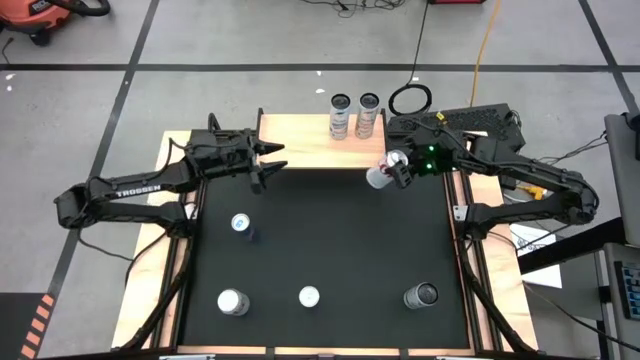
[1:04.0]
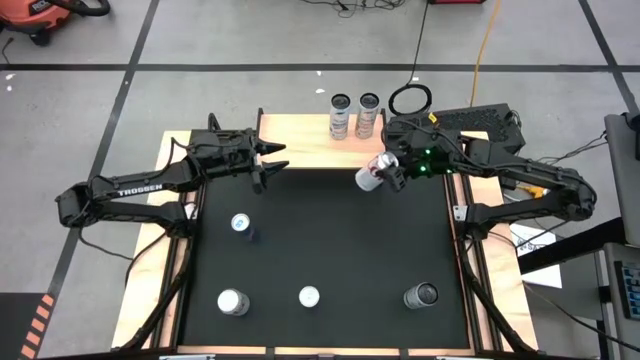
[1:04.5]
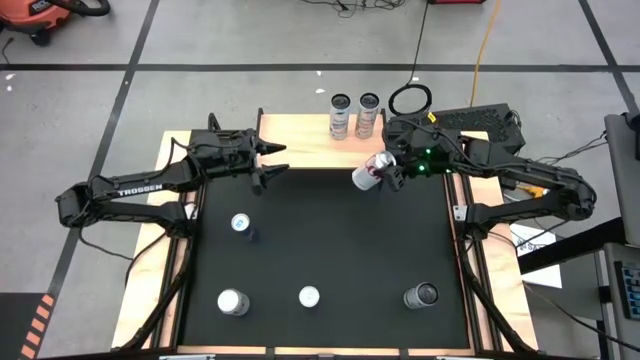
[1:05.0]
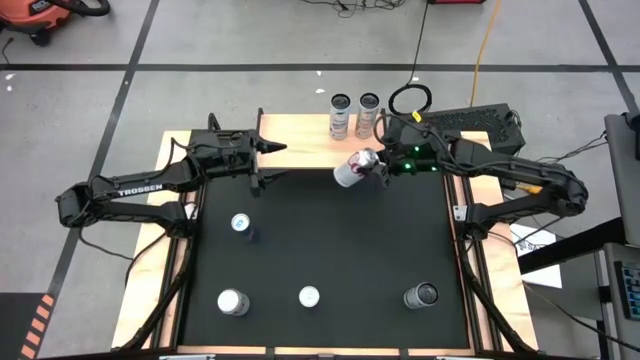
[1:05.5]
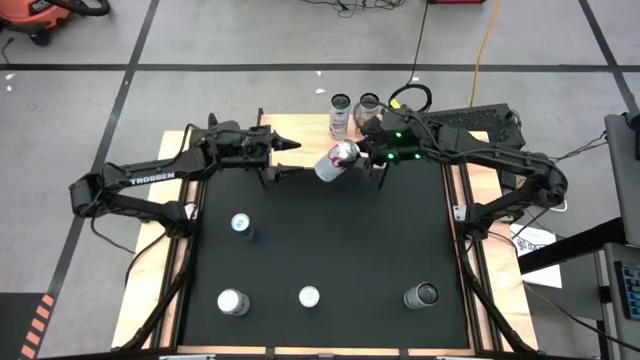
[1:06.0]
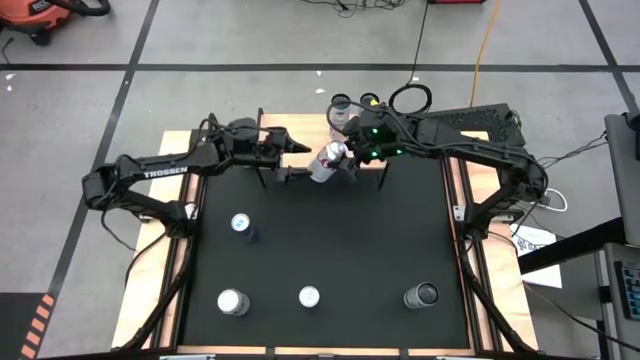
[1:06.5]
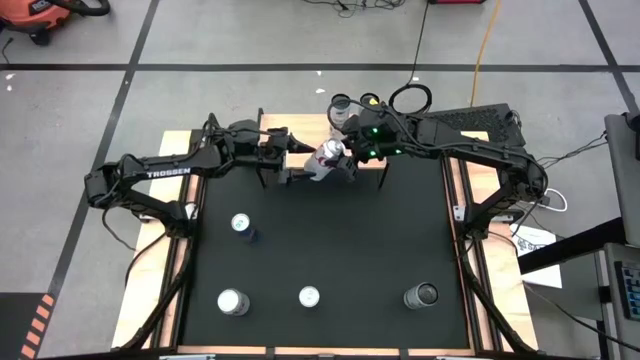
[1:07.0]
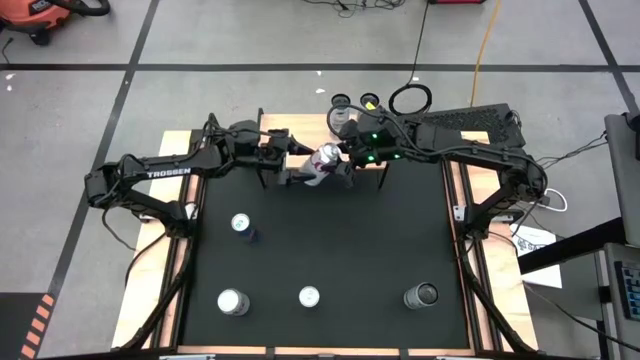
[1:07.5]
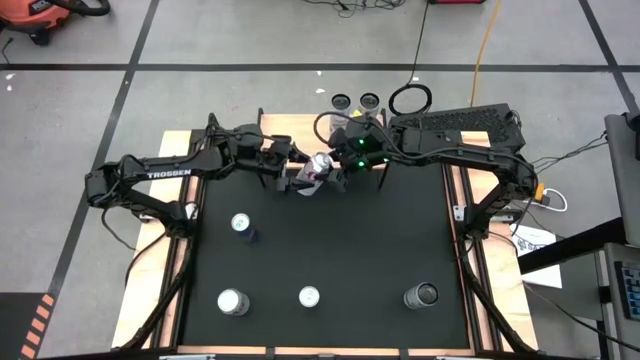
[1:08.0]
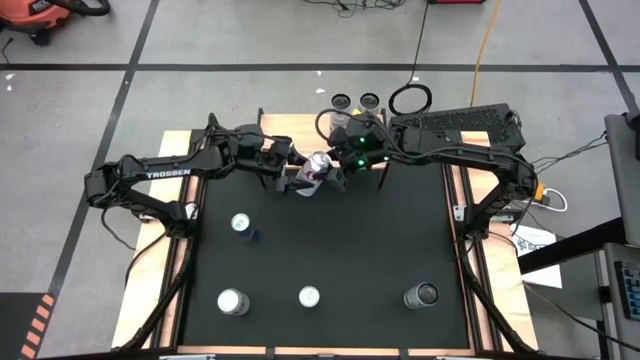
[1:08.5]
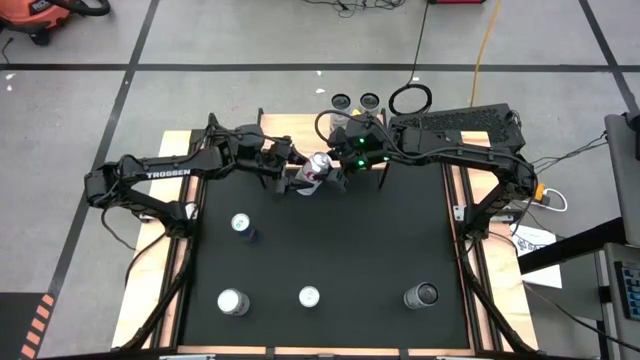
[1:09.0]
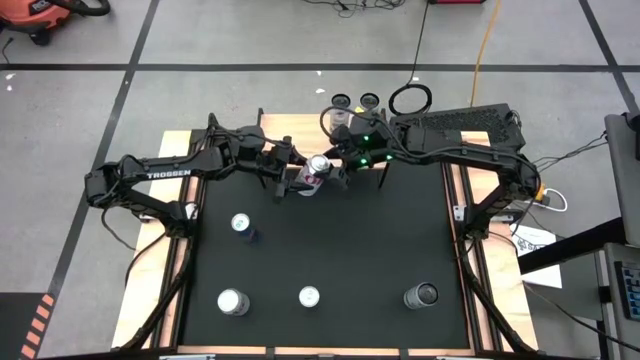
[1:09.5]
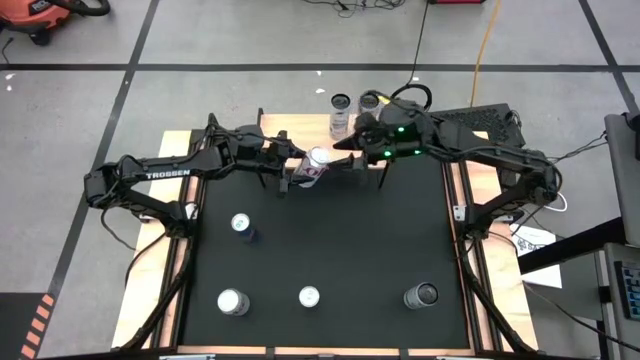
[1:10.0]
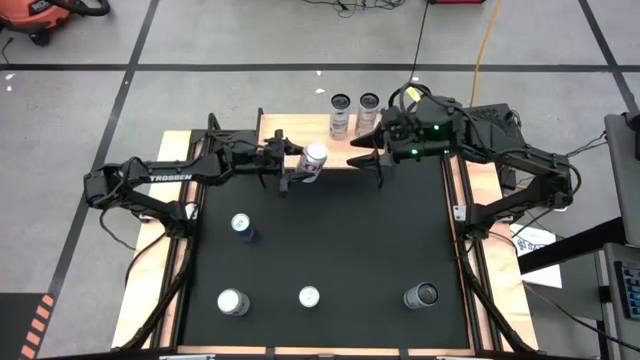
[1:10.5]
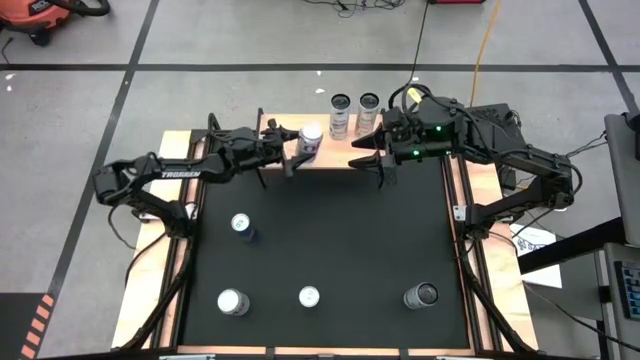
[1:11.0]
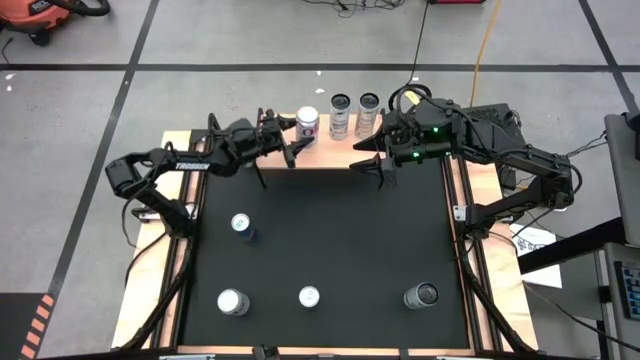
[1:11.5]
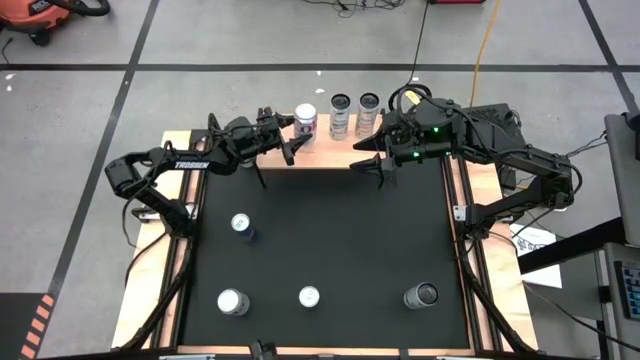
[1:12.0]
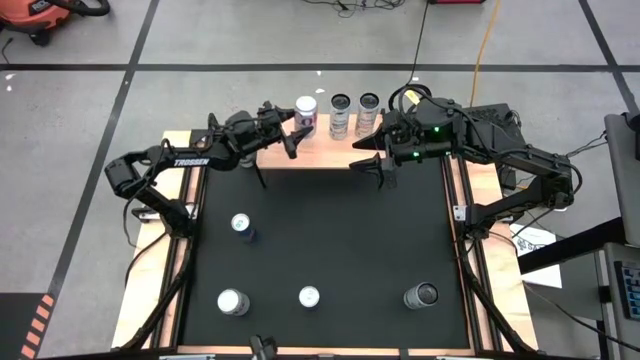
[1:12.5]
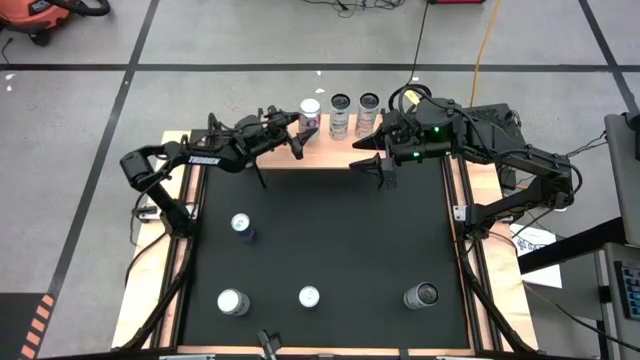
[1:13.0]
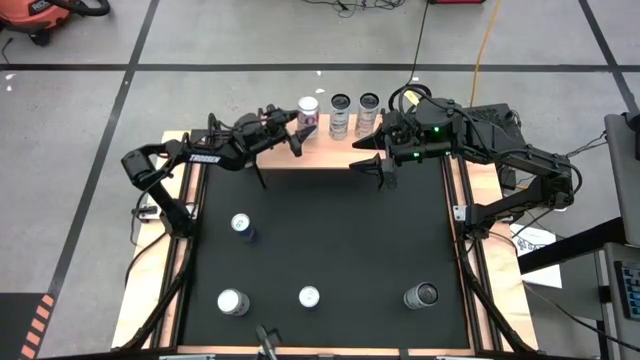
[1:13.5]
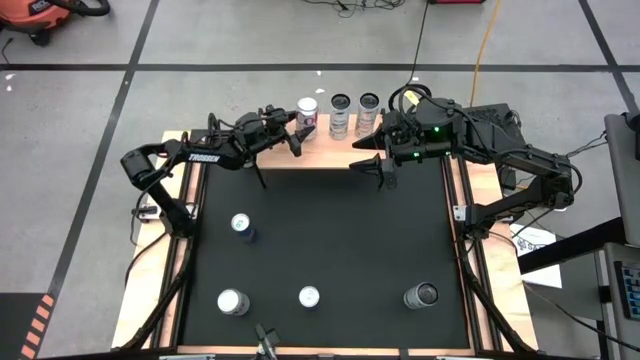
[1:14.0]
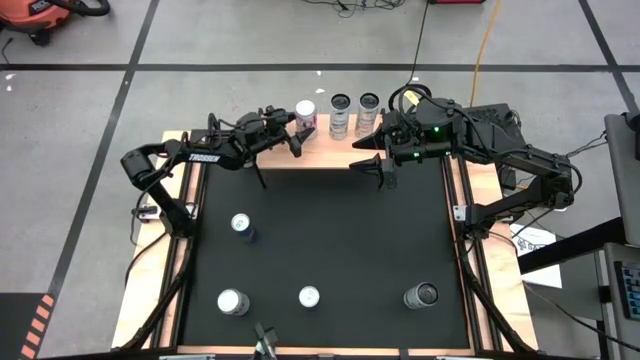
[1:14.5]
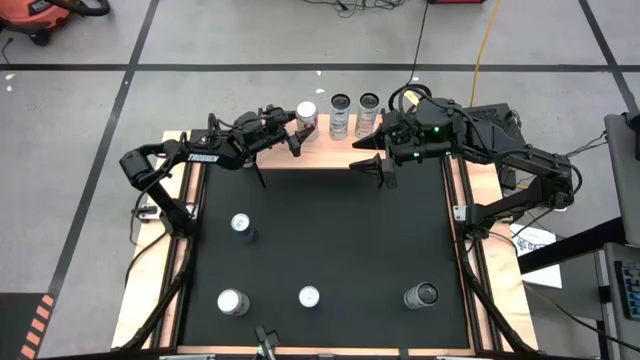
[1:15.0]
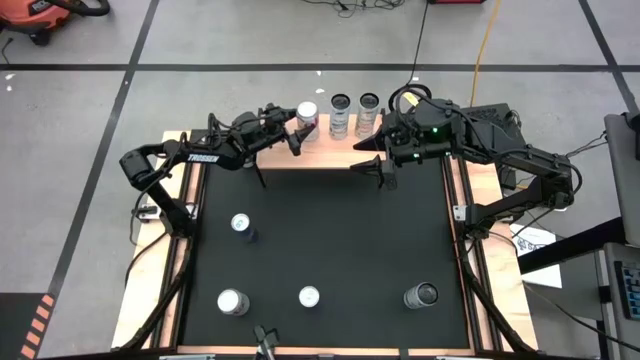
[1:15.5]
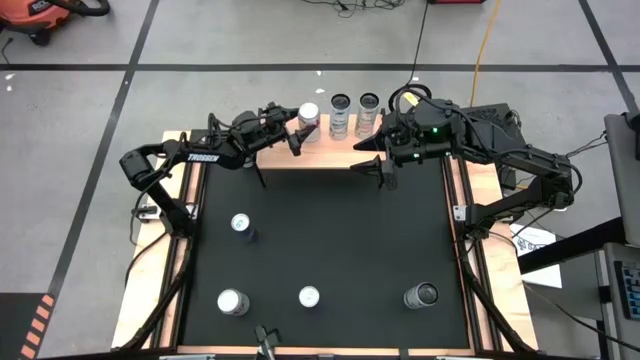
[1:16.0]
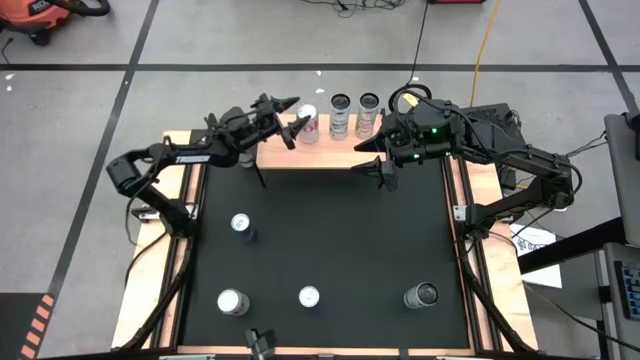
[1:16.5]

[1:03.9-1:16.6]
Task: Place canned beverage on shelf
Put the top red silver soda can on the shelf

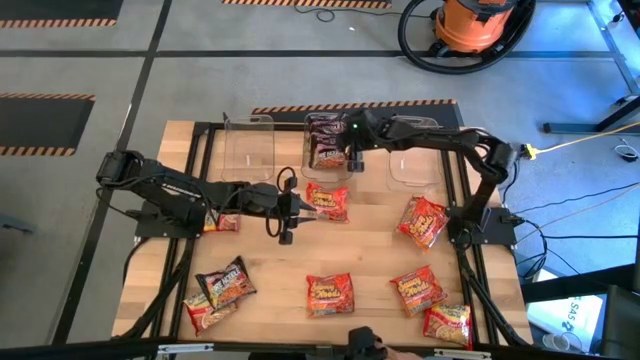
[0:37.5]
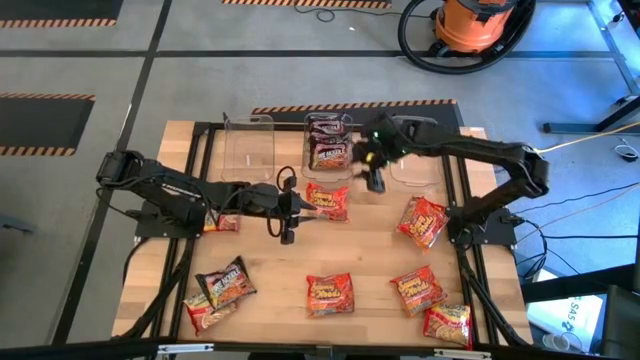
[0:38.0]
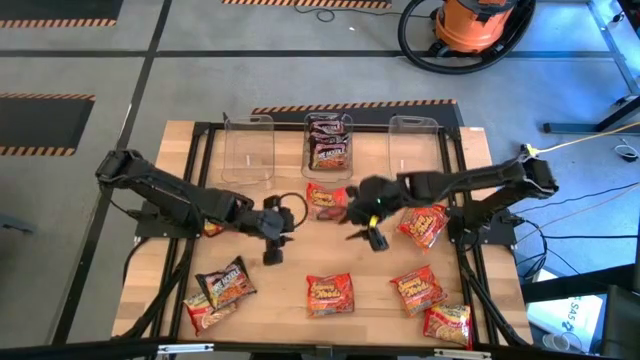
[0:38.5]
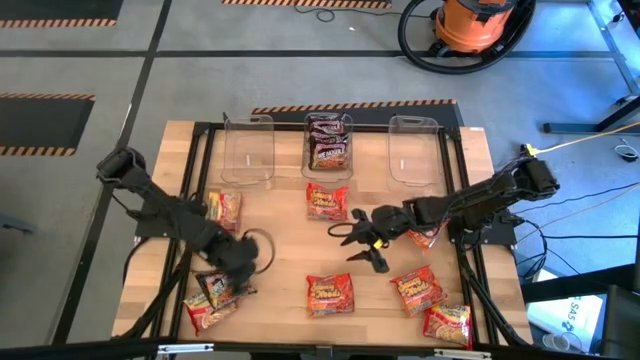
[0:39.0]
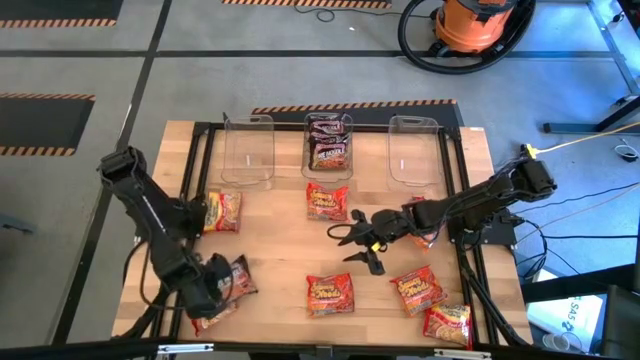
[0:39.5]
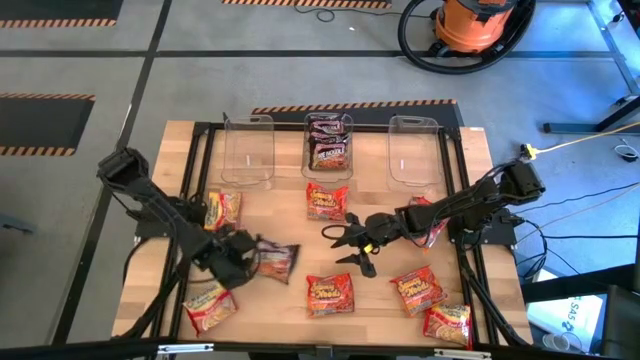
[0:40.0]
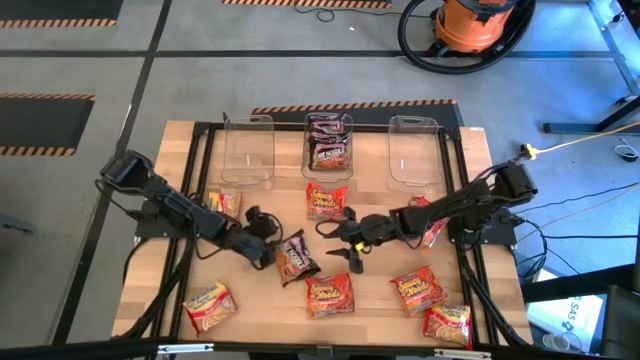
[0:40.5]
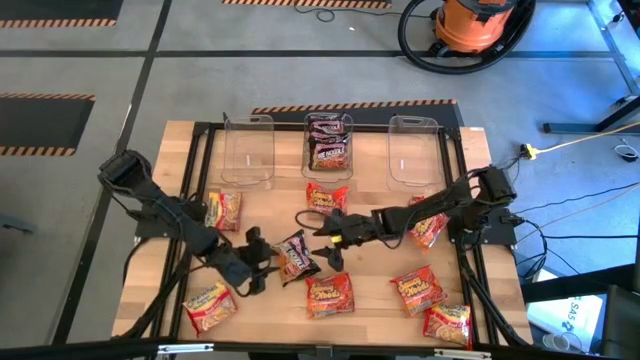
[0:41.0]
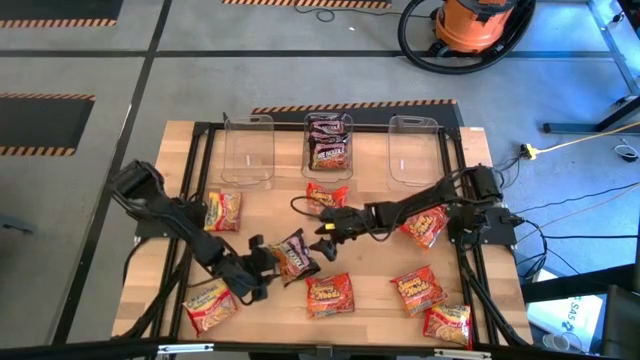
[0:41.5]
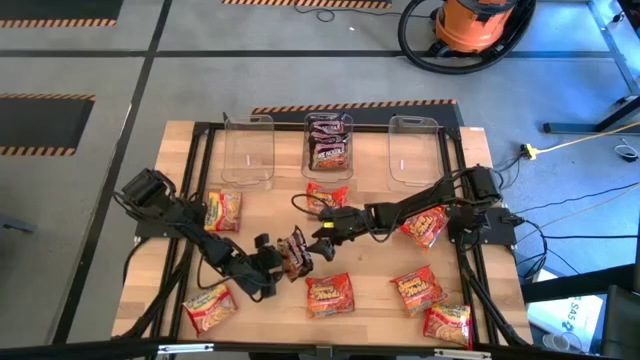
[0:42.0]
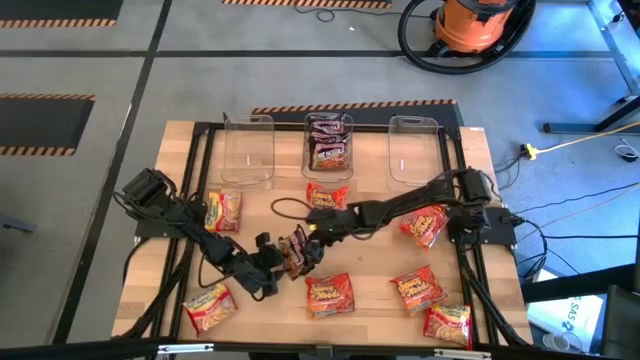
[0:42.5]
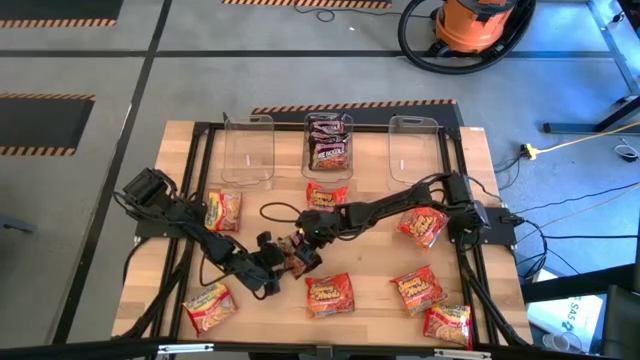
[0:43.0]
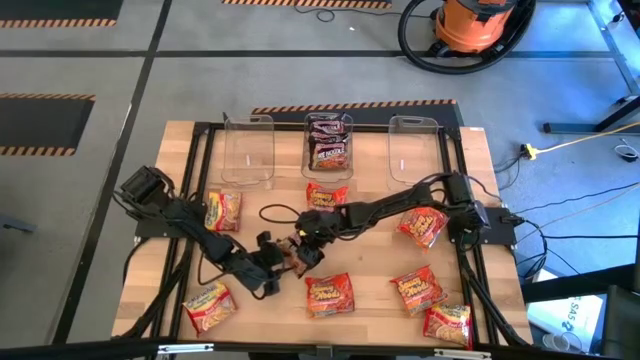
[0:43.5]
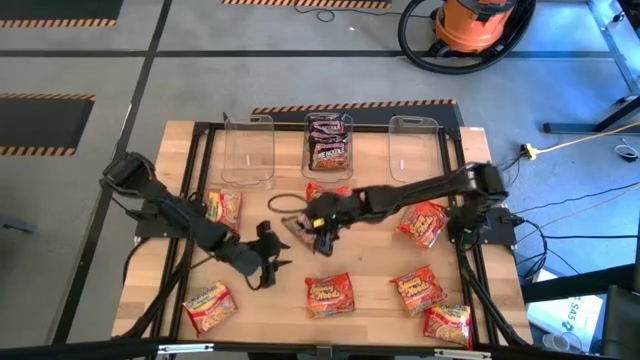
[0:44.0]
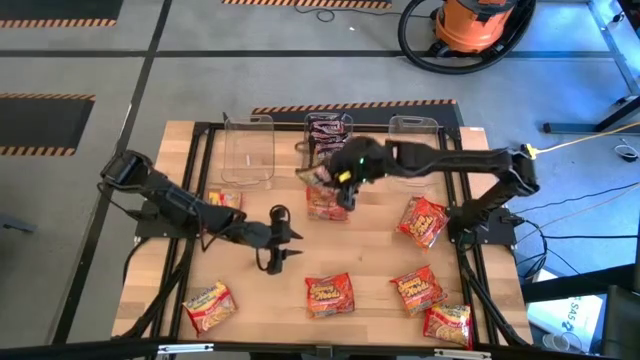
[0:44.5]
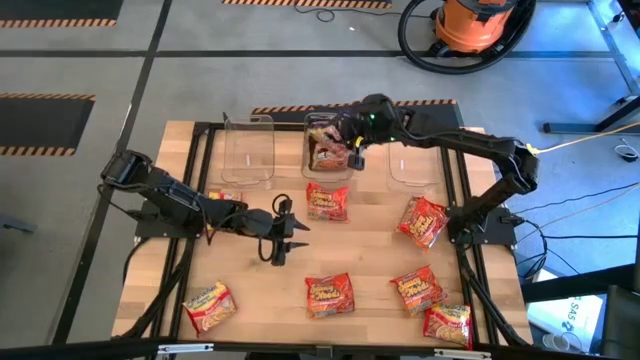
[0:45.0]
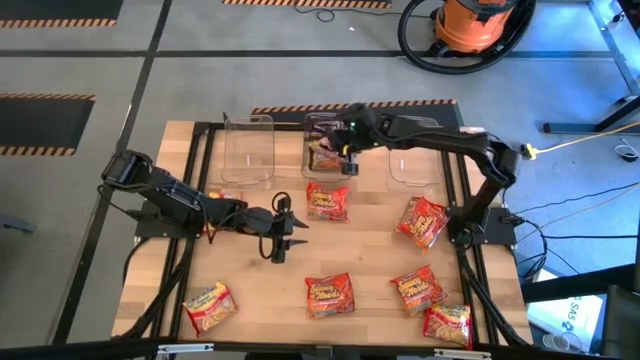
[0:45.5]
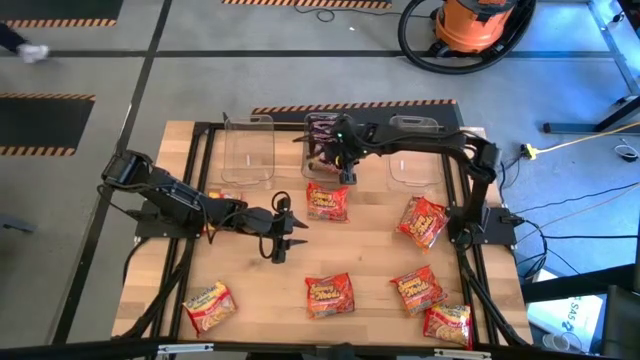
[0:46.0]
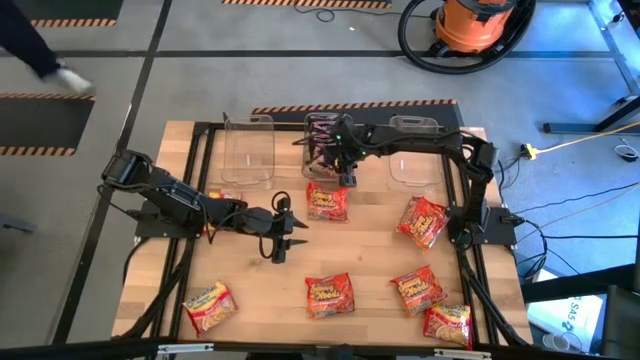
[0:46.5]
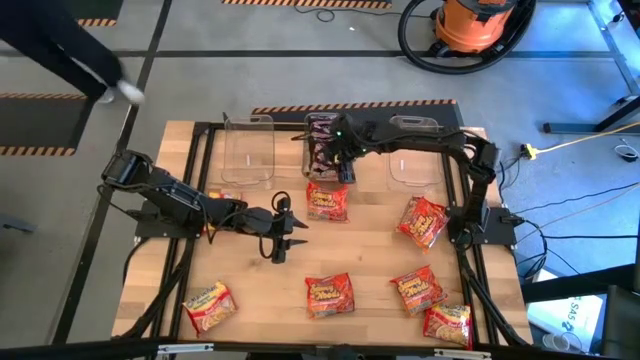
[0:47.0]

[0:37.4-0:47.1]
Task: Sort Maruchan noodles
Put the black noodle pack into the middle transparent bin
